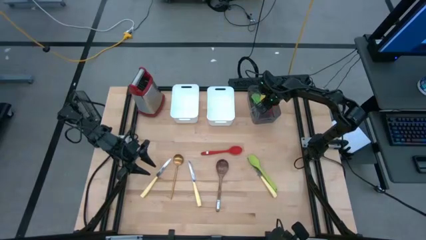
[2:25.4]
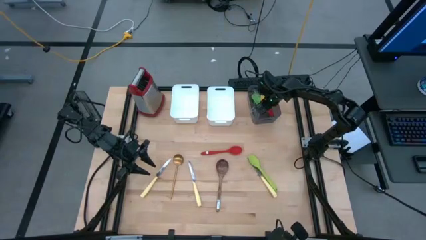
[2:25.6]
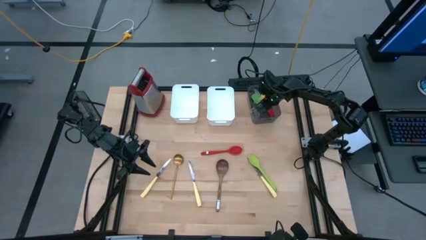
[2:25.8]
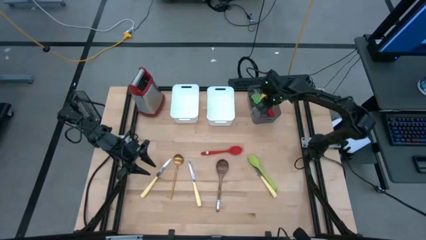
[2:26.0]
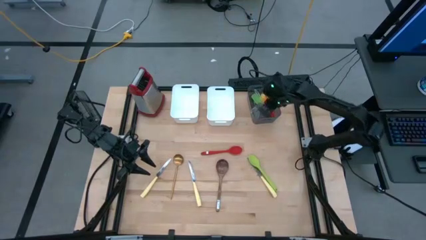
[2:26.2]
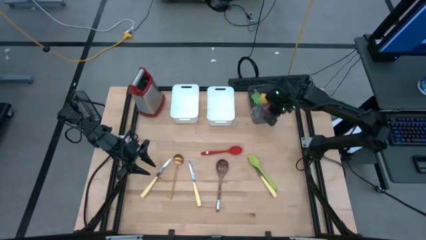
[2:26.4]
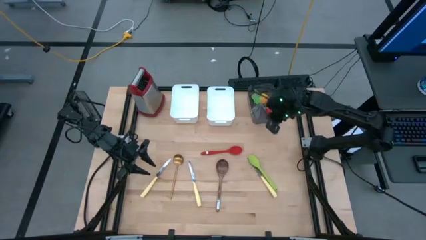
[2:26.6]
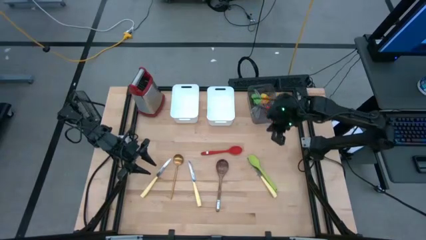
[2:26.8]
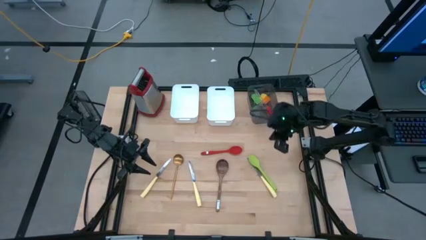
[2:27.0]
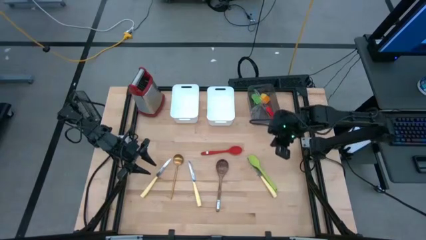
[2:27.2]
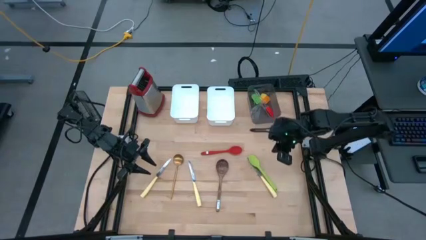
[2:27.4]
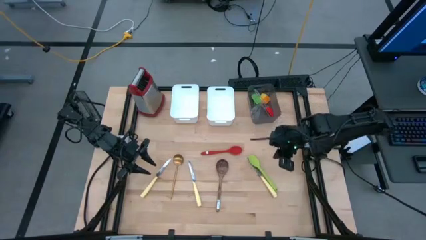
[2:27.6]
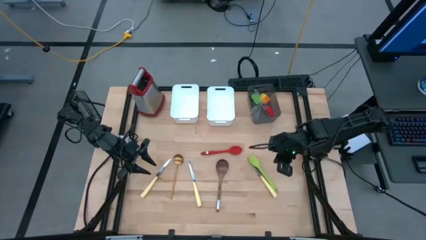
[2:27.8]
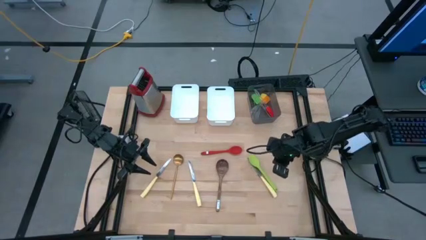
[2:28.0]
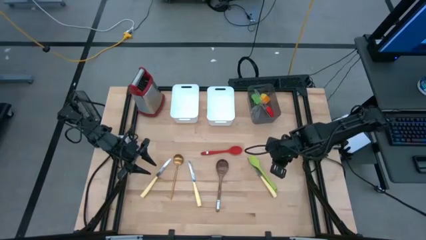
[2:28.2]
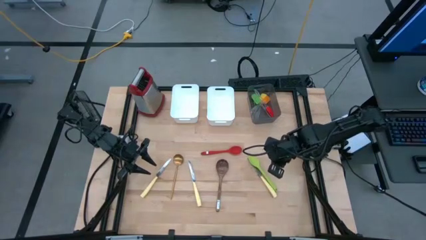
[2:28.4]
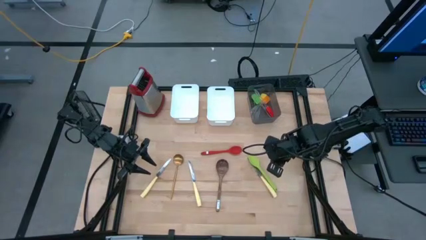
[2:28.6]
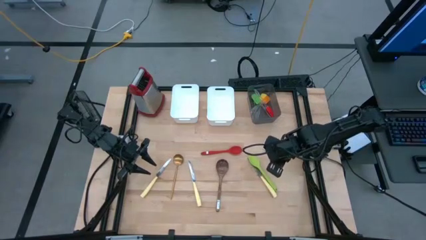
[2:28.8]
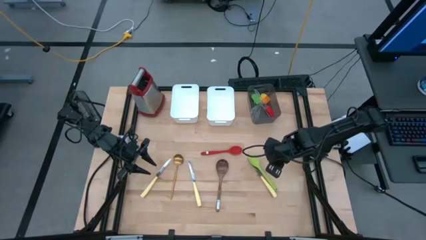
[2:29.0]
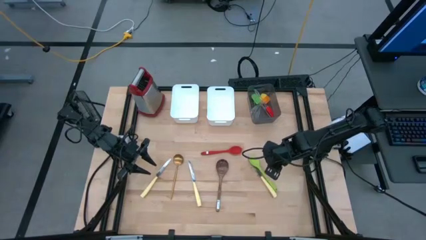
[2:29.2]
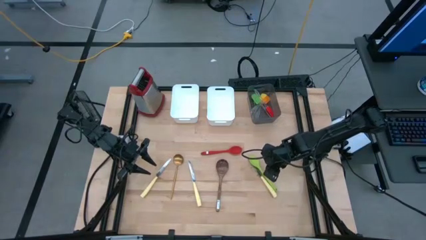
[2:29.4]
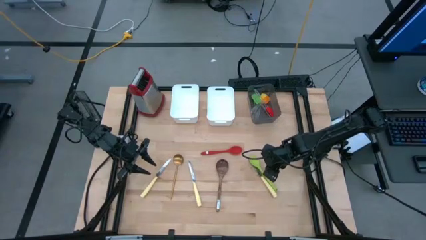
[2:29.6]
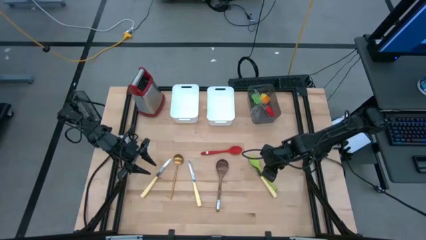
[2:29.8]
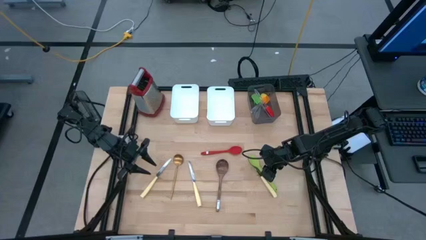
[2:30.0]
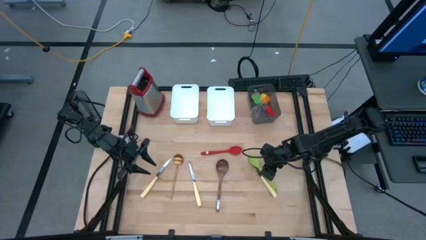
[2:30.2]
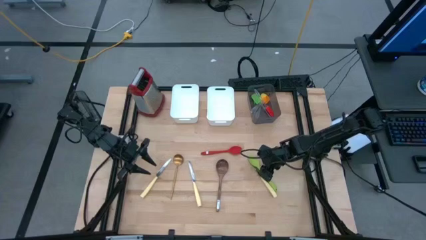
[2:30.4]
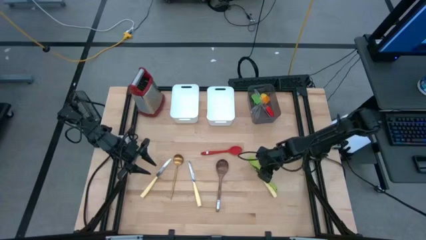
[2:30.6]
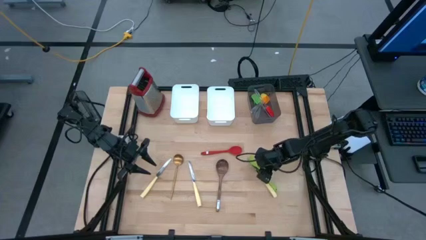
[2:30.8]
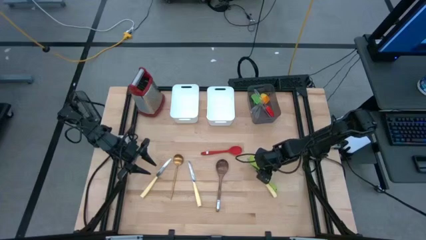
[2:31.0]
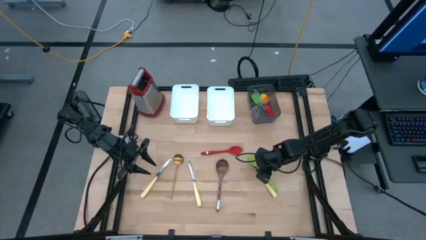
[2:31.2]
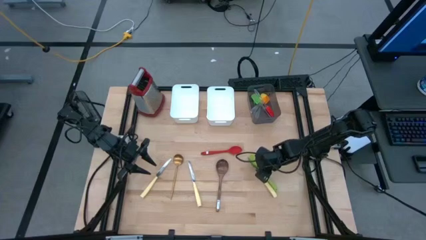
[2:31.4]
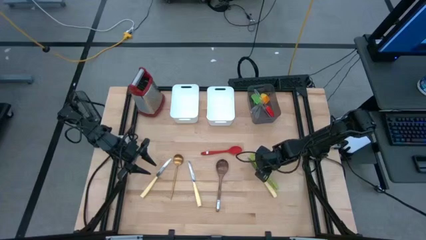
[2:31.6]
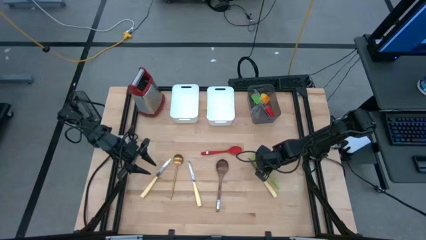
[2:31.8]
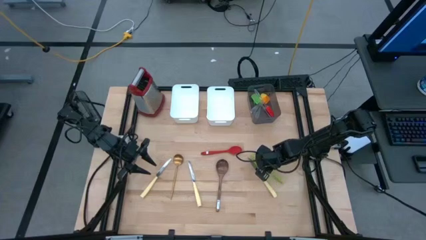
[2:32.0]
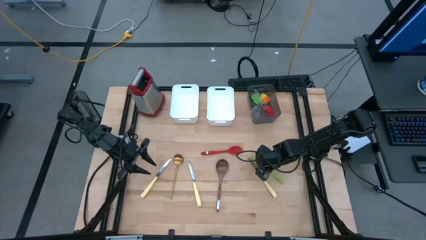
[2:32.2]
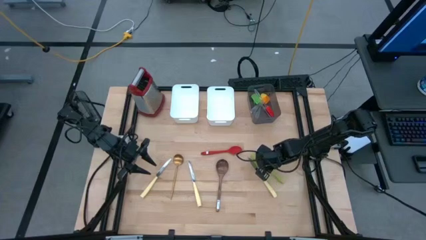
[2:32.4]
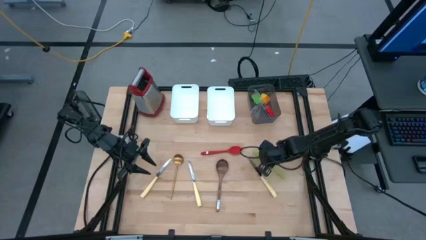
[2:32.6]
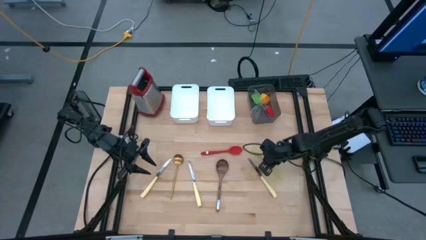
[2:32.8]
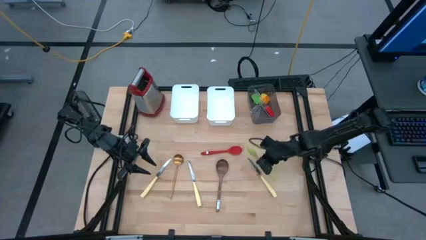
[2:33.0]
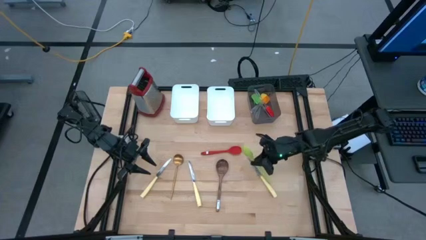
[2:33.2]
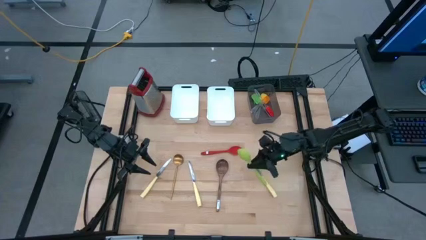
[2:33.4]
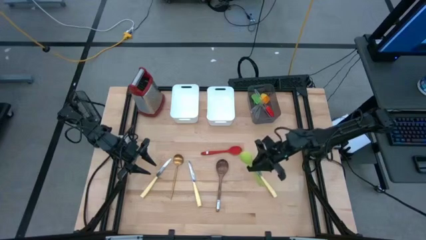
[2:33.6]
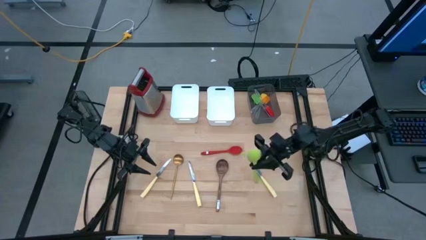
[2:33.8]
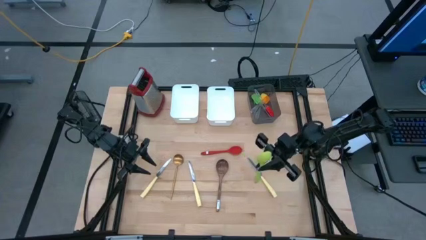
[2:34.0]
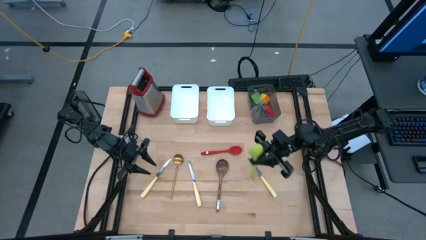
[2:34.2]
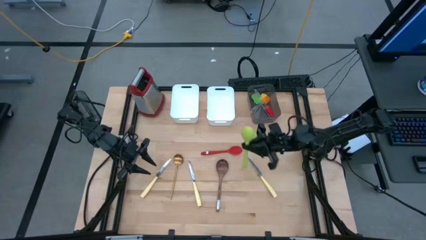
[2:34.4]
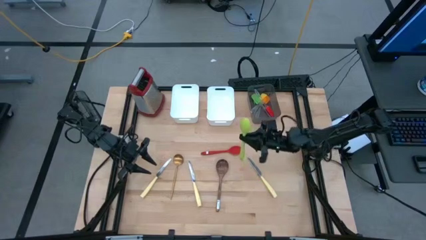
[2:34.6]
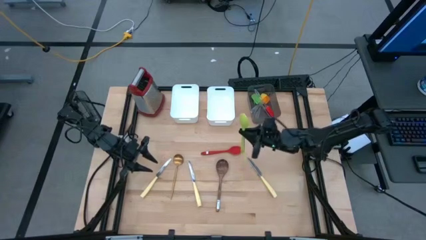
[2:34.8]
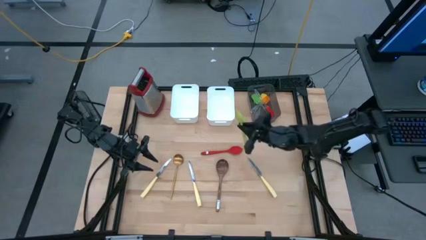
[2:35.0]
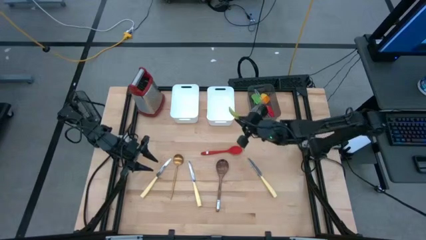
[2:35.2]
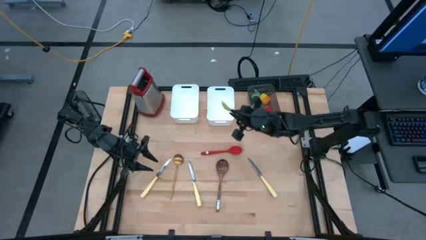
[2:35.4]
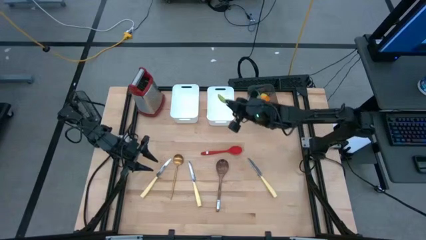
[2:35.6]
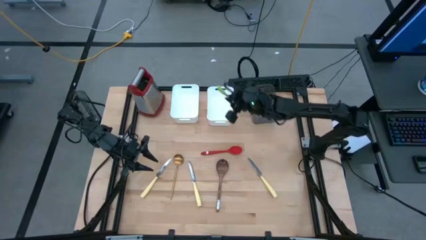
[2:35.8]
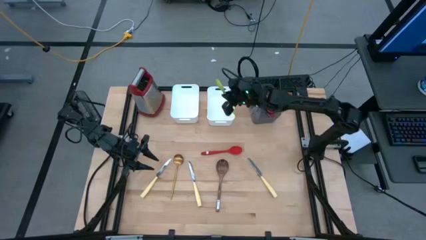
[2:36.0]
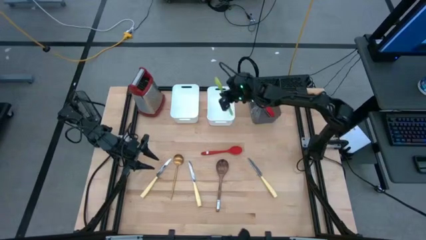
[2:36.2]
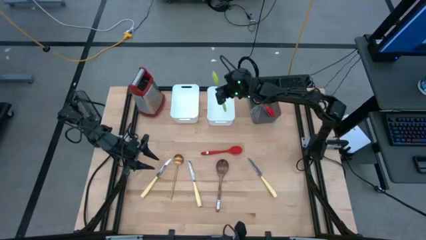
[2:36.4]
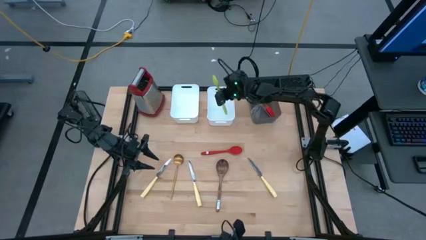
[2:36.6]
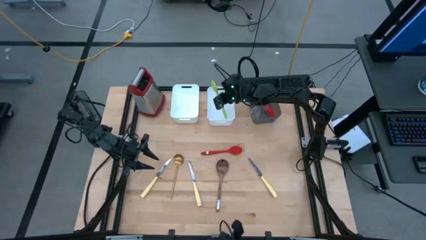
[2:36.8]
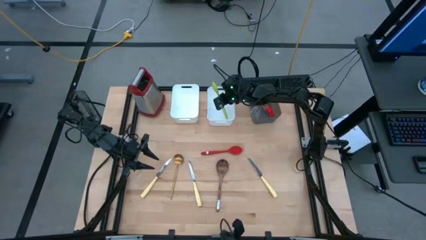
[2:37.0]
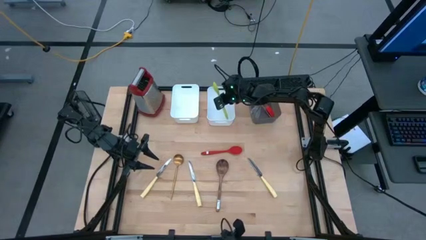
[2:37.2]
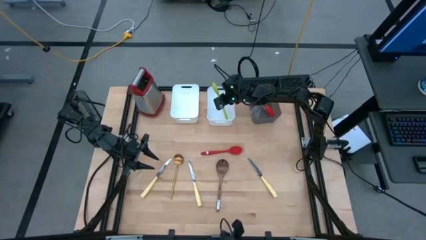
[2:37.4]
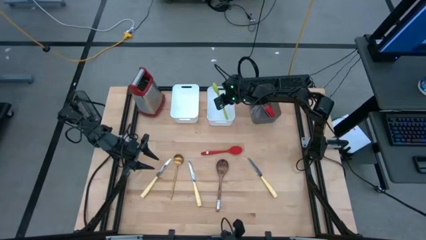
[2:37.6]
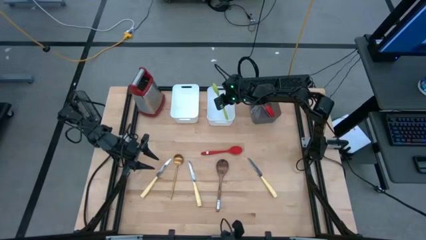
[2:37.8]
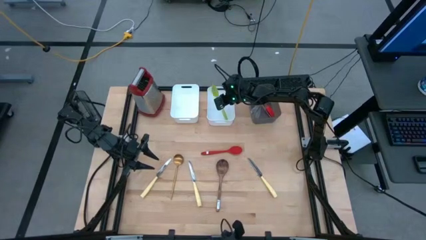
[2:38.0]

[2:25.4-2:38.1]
Task: Pick & Place Kitchen Items
Put the green serving spoon into the right white bin
